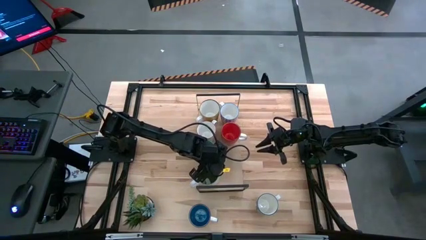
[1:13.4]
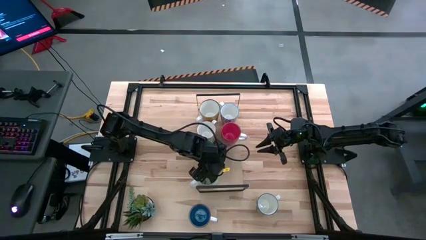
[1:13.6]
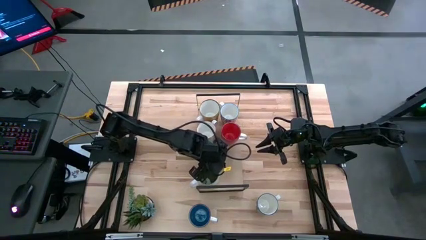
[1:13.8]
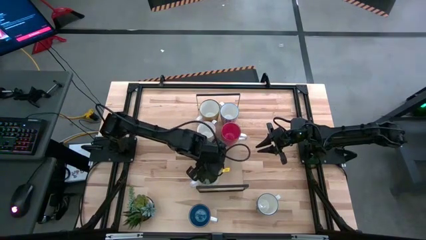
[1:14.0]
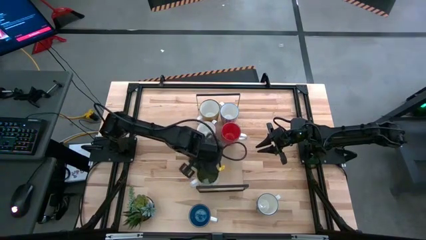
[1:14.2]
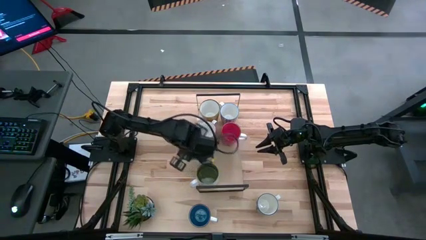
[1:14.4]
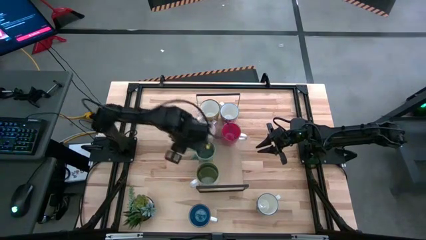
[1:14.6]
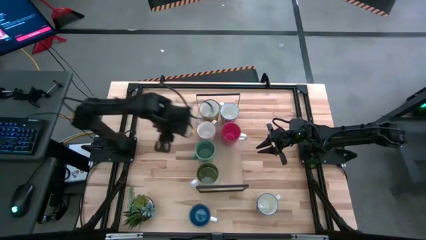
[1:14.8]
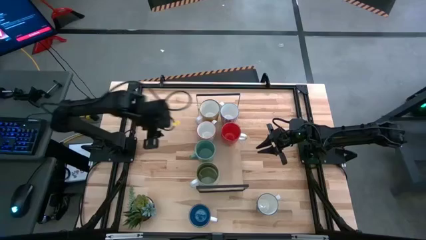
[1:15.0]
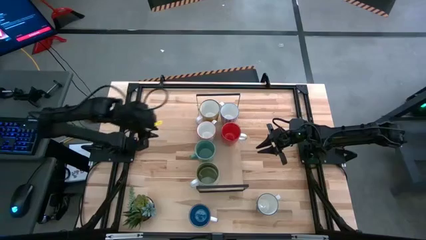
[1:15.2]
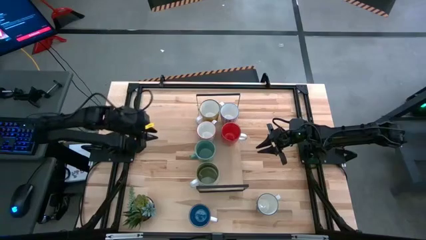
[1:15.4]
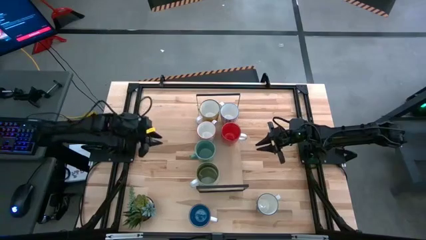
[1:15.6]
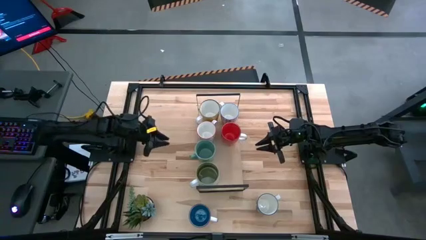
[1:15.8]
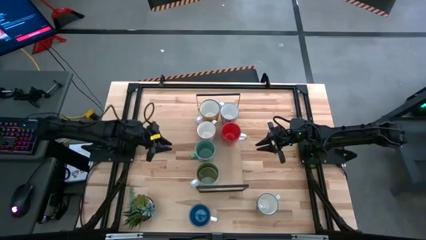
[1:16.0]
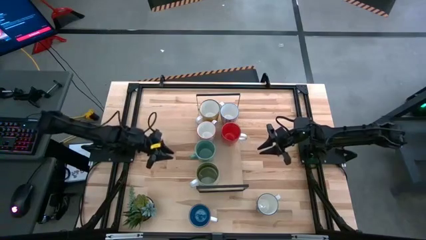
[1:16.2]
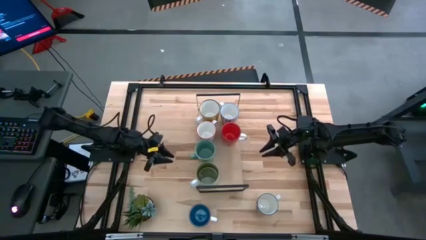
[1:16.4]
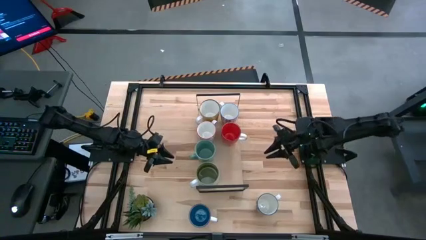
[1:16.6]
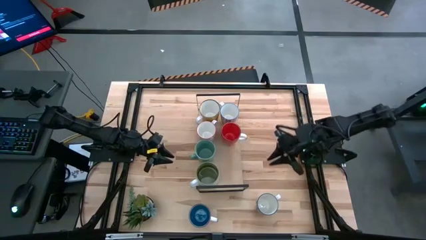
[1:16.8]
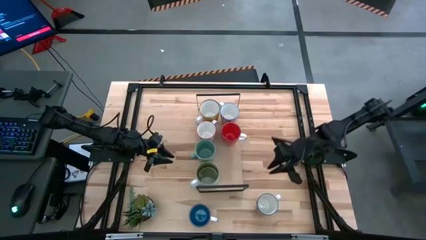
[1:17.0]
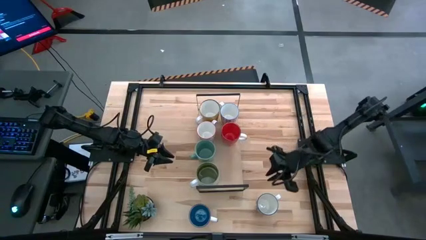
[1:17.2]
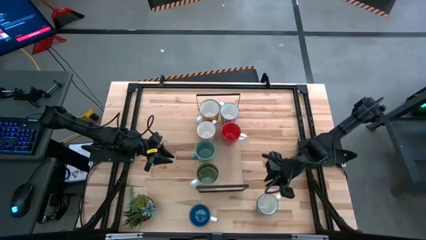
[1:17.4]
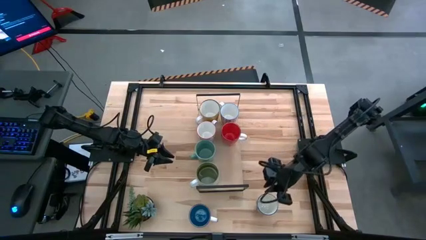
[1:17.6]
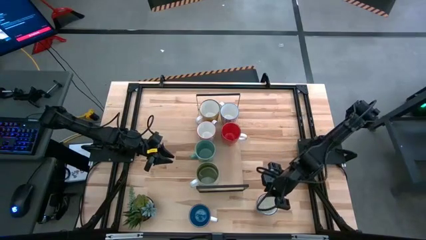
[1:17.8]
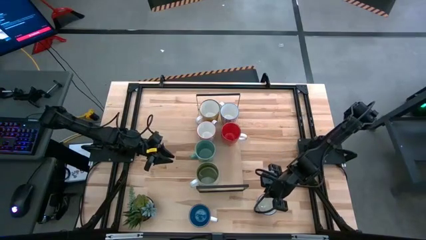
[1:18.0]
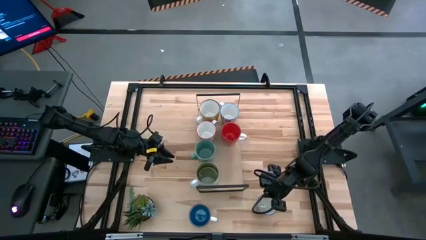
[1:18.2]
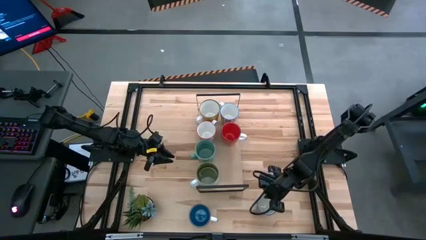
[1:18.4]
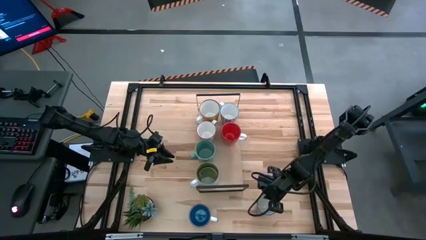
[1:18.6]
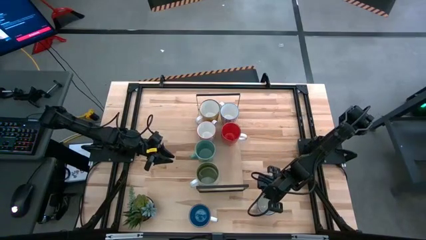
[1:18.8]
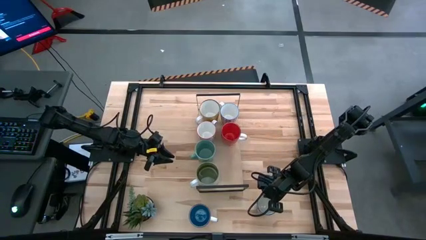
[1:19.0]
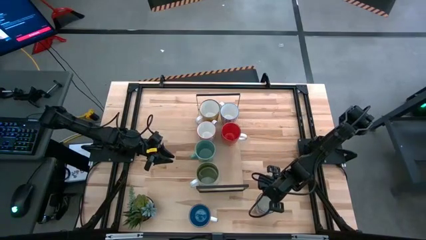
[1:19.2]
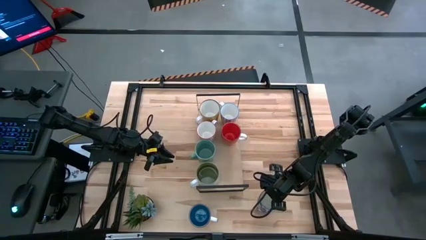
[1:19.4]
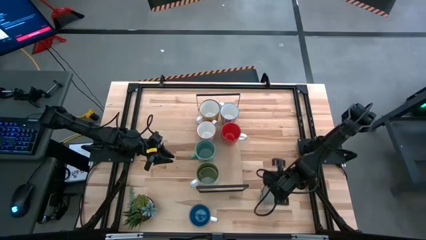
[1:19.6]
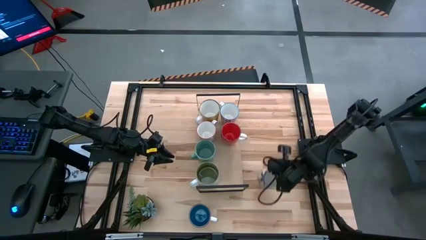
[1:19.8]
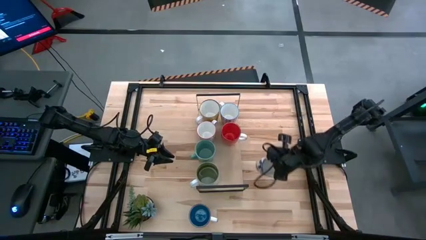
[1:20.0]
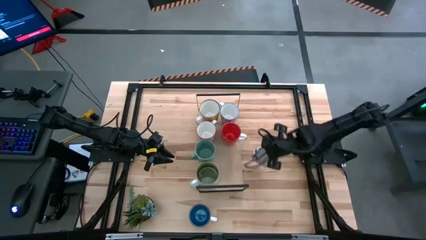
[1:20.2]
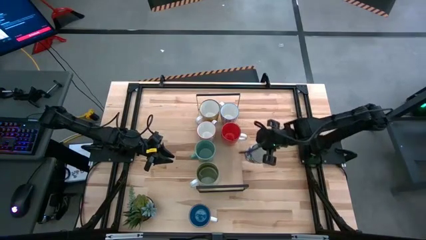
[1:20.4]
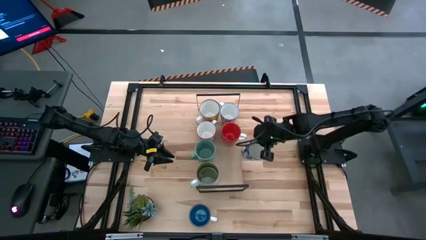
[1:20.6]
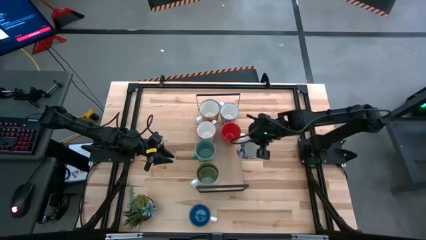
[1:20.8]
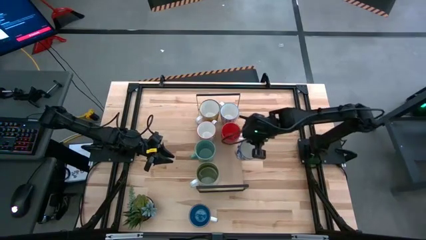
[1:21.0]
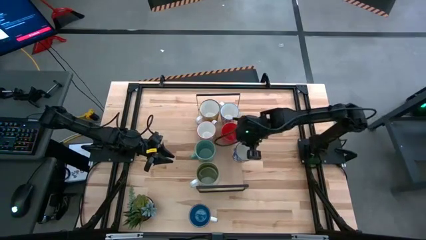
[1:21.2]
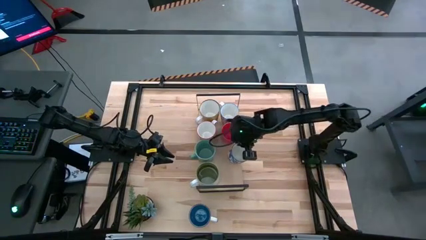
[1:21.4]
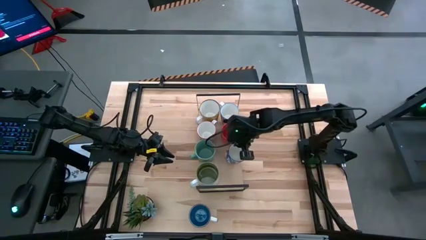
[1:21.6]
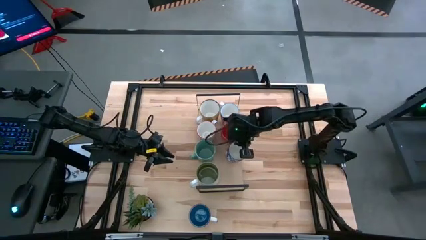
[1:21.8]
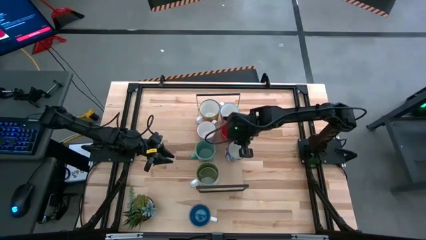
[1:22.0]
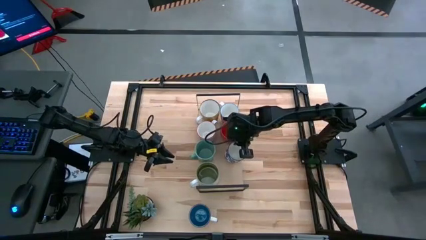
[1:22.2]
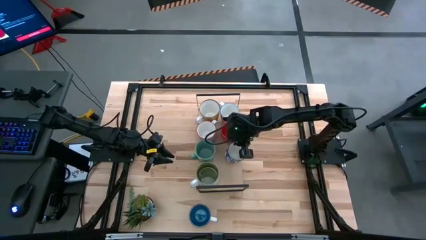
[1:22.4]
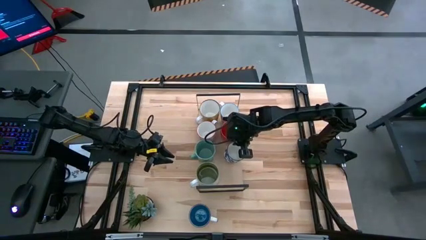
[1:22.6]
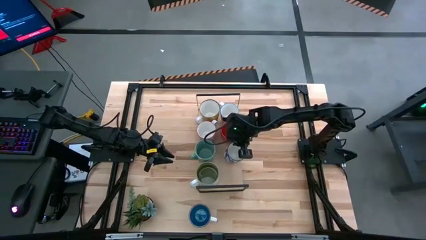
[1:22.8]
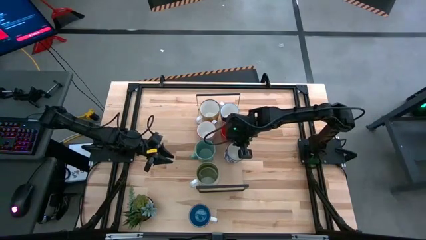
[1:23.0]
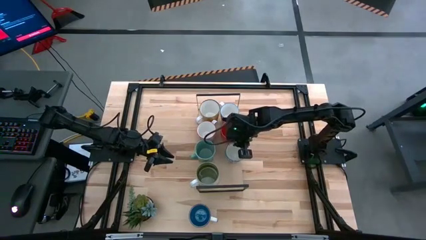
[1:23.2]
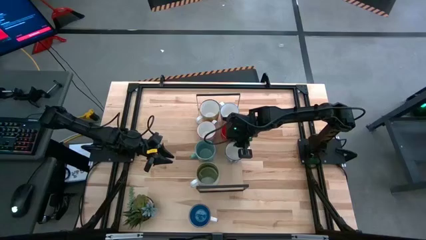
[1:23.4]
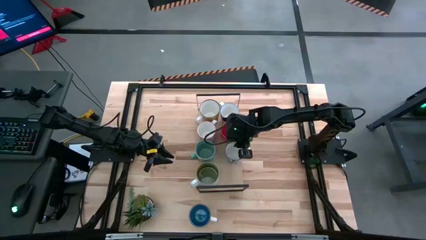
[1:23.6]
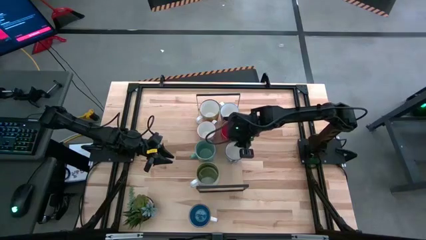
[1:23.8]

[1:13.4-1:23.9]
Task: Place coffee mugs
Put the white and blue patterned mug on the shelf

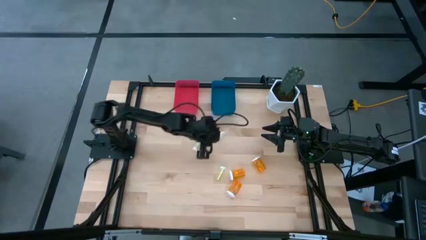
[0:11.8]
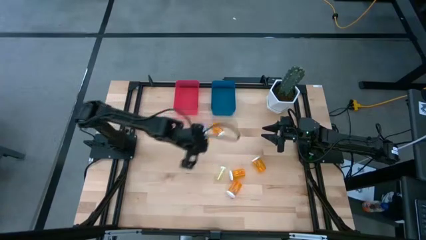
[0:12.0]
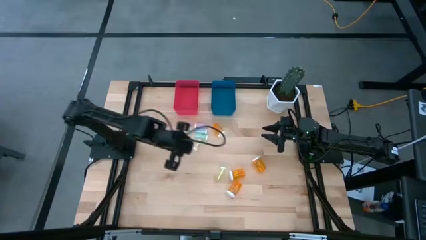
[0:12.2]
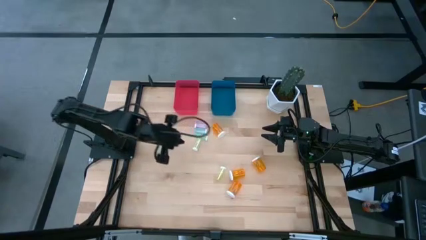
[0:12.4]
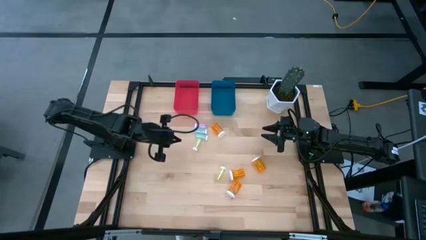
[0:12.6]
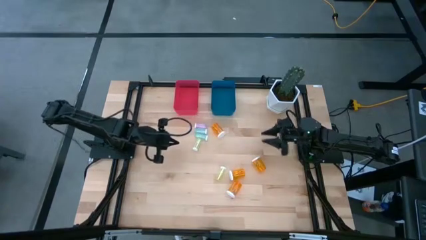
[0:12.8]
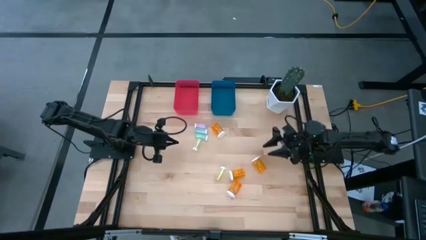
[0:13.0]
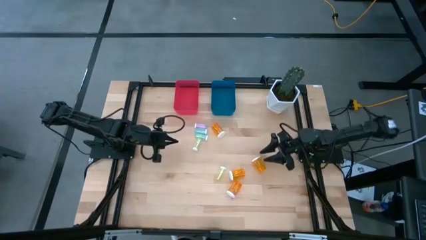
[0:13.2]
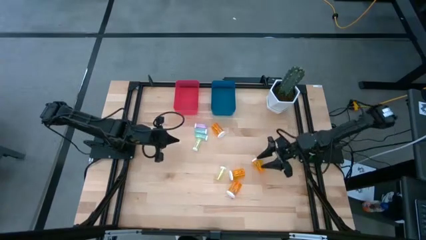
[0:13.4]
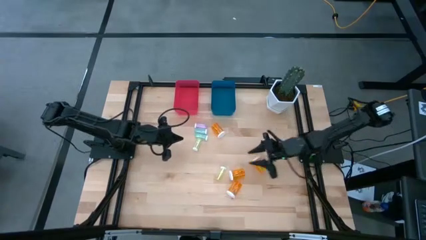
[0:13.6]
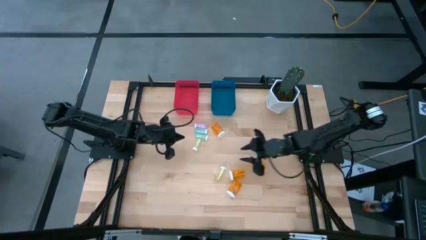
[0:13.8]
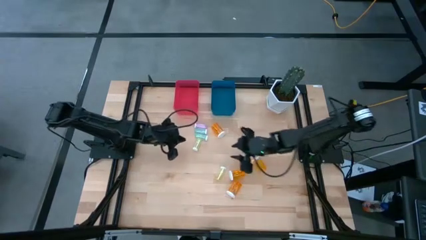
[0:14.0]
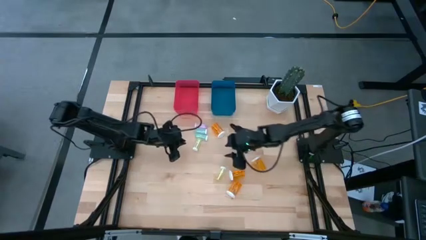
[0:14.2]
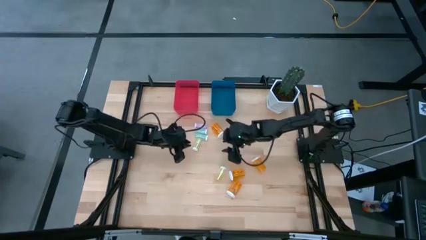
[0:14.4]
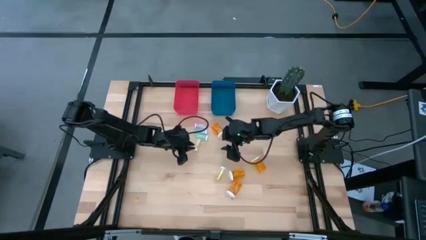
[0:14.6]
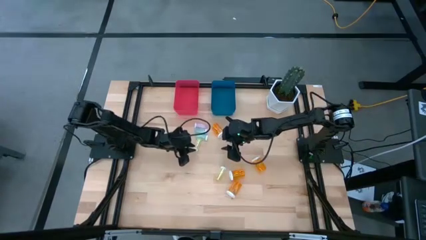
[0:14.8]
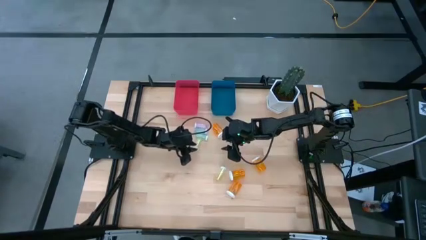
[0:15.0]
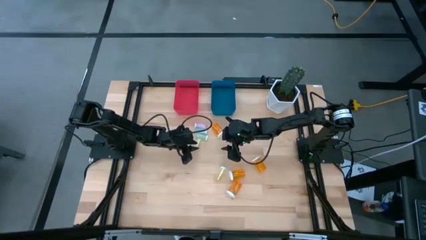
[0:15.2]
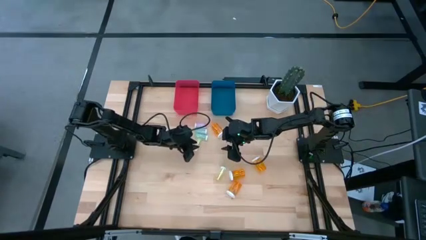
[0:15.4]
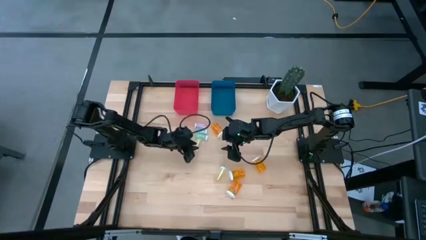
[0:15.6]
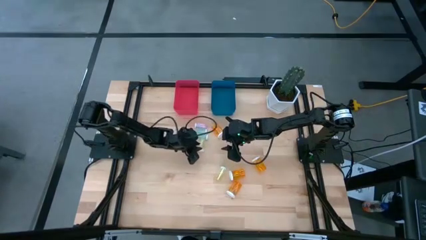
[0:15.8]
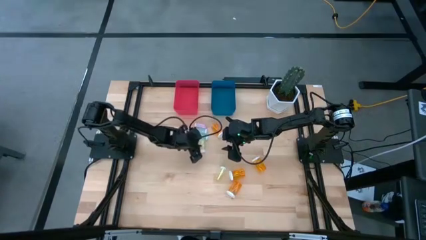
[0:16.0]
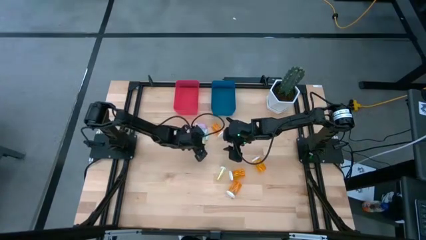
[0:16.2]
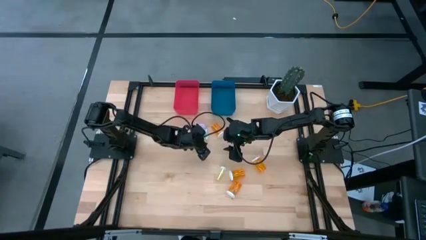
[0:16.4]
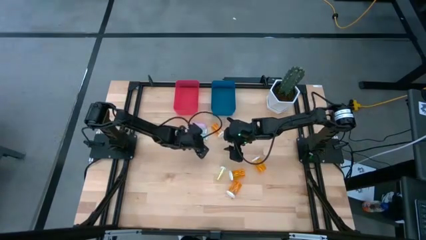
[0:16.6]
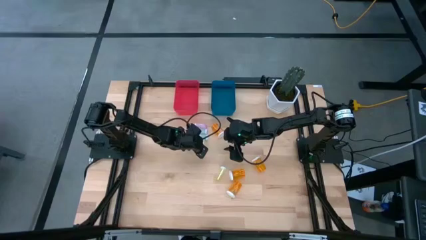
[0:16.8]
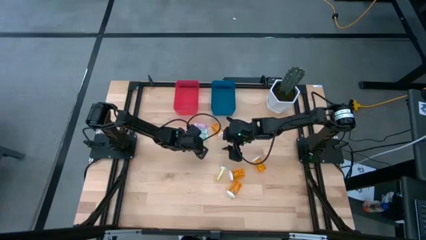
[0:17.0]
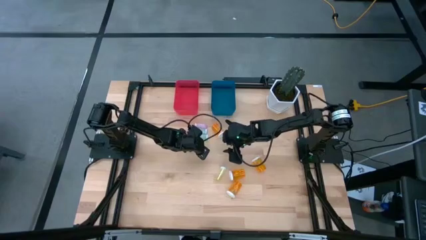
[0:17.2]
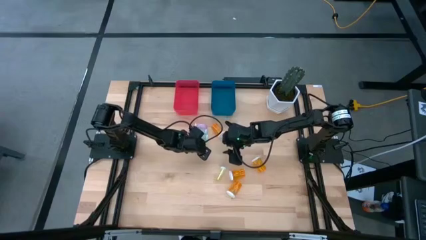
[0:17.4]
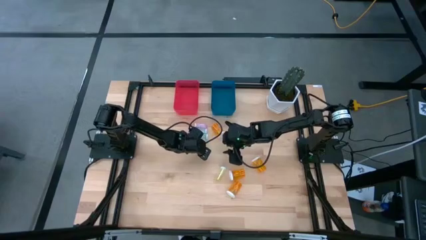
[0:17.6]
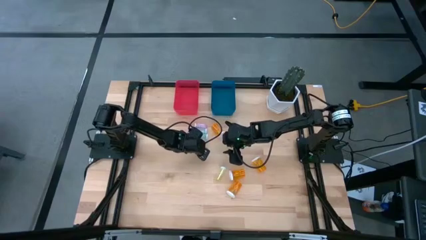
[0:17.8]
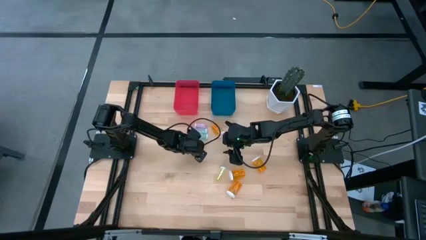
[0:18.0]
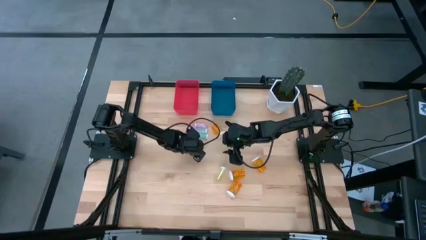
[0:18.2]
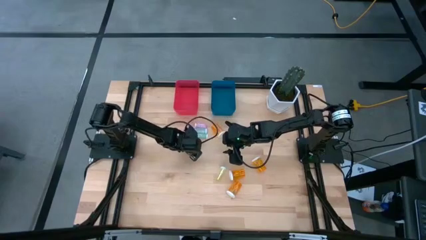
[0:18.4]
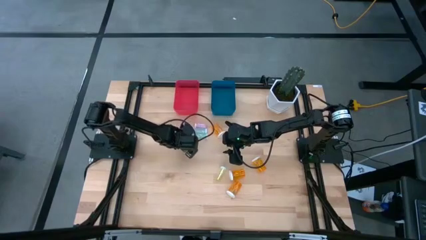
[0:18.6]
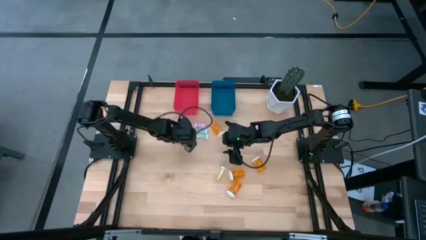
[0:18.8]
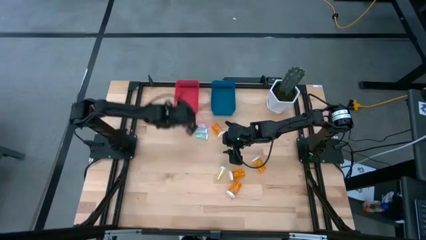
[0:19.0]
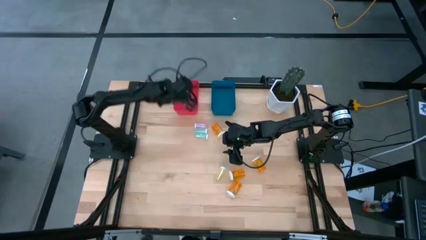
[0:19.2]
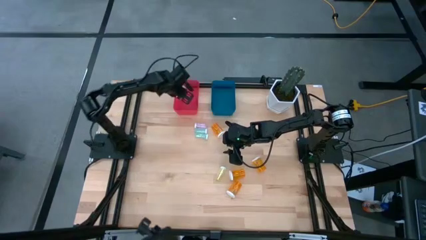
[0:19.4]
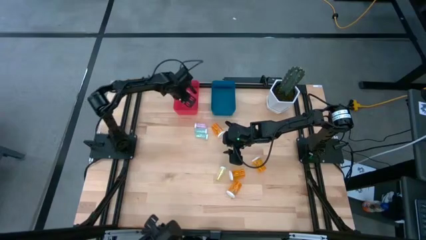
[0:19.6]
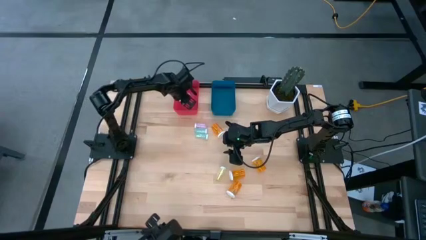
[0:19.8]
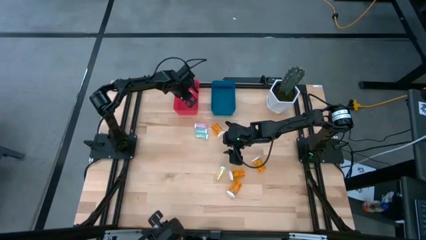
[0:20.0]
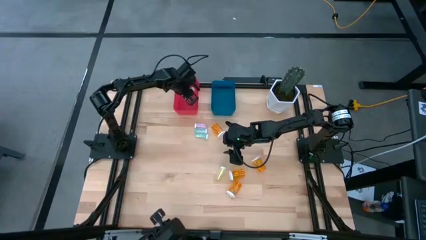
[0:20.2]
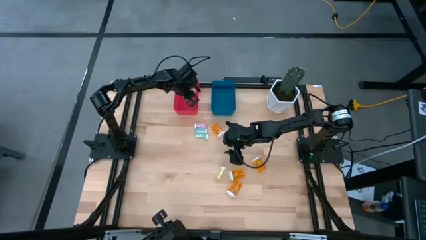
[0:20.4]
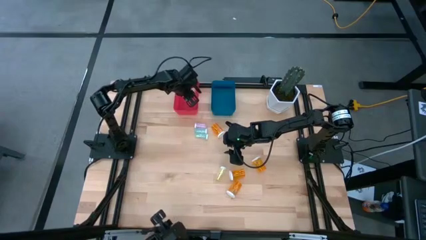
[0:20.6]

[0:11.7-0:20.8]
Task: Pick and place medicine bottles into bin by pill shape (circle, oval)
Put the yellow tablet bottle into the red bin
